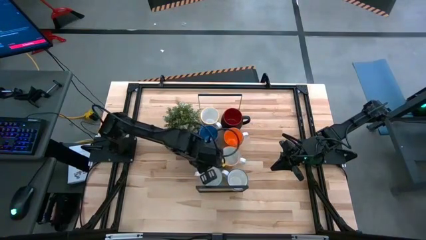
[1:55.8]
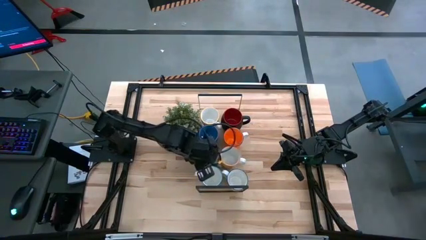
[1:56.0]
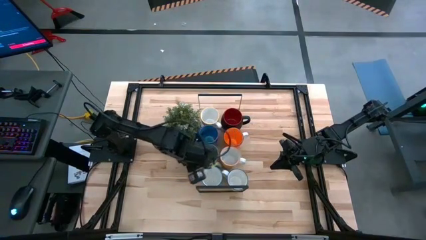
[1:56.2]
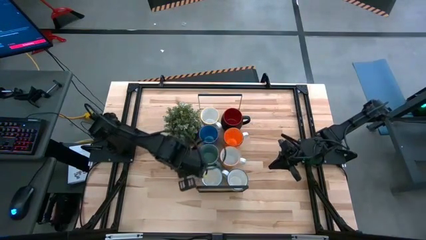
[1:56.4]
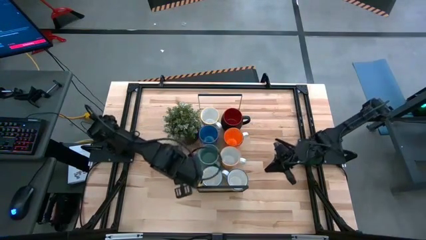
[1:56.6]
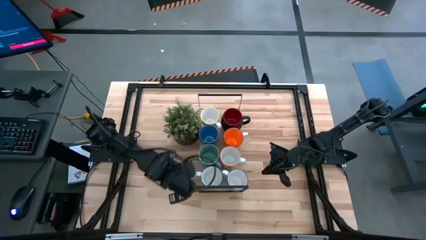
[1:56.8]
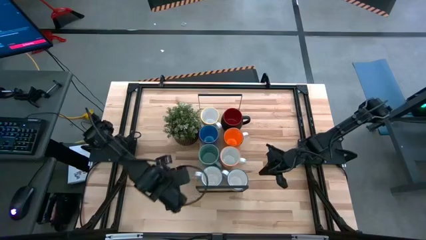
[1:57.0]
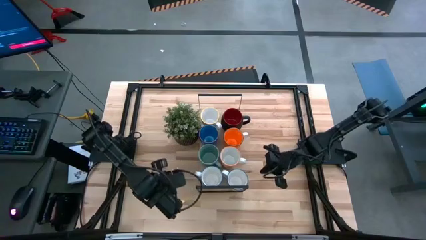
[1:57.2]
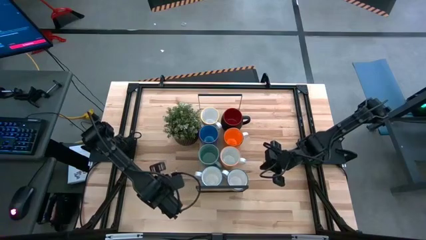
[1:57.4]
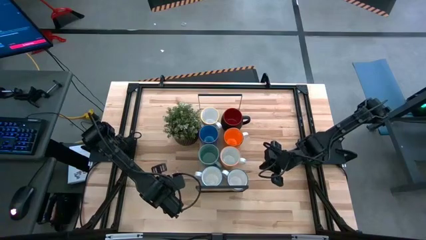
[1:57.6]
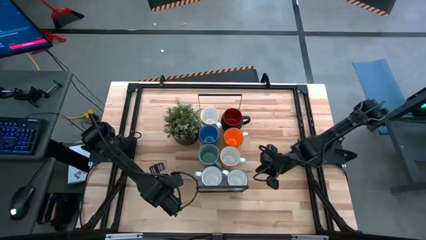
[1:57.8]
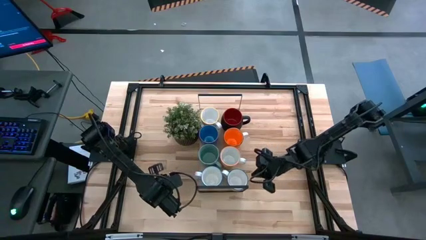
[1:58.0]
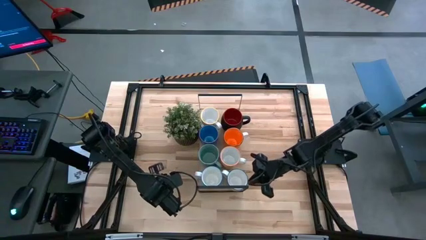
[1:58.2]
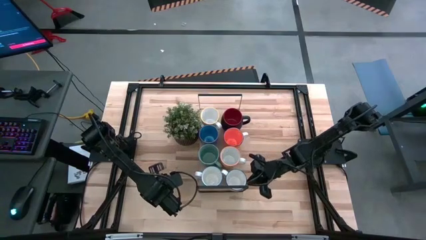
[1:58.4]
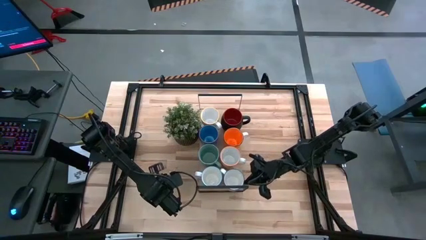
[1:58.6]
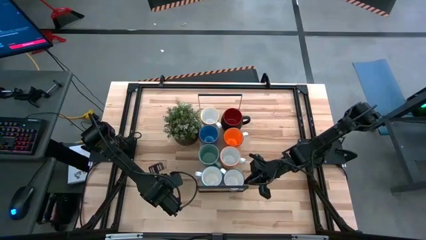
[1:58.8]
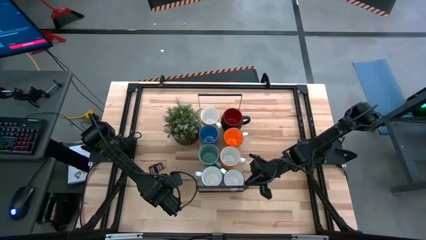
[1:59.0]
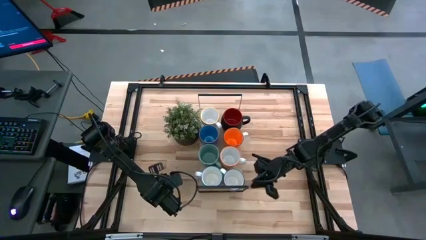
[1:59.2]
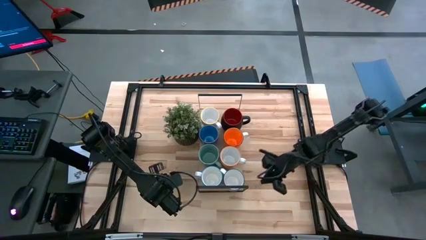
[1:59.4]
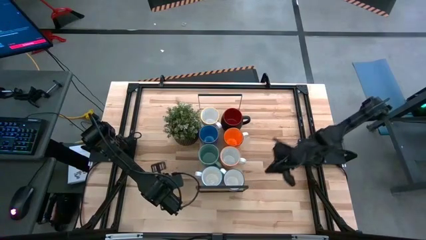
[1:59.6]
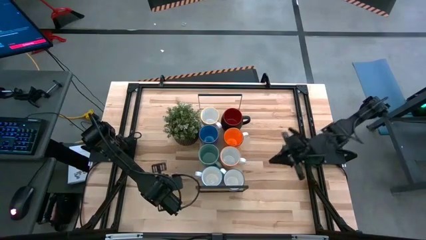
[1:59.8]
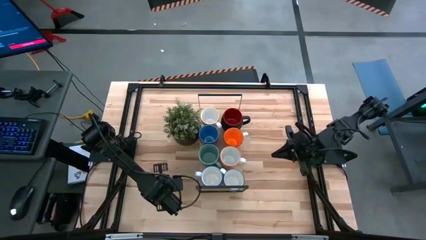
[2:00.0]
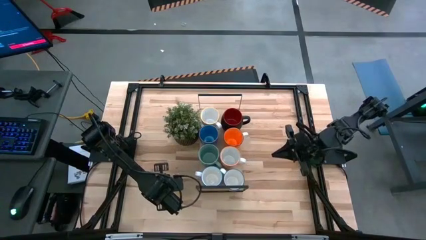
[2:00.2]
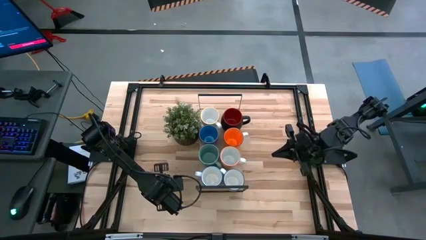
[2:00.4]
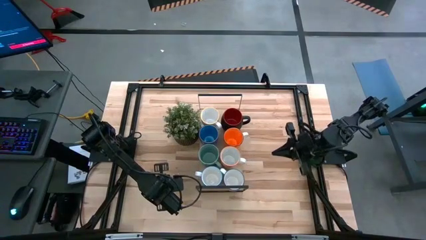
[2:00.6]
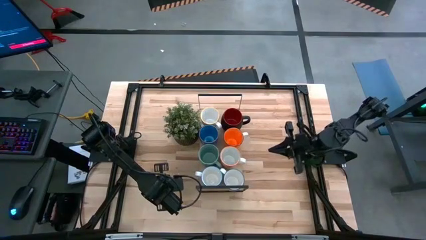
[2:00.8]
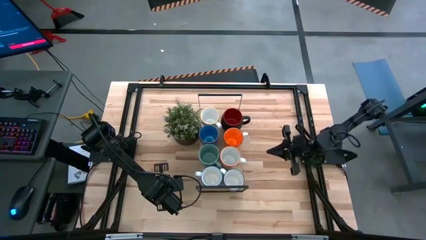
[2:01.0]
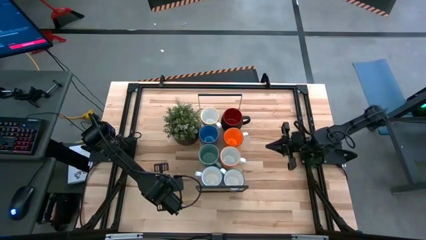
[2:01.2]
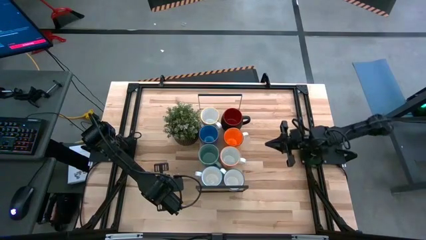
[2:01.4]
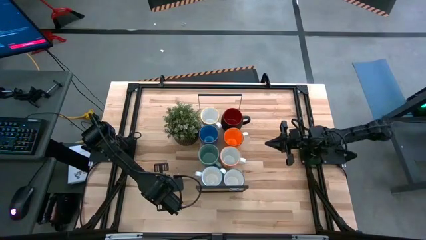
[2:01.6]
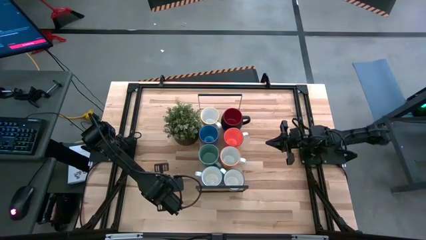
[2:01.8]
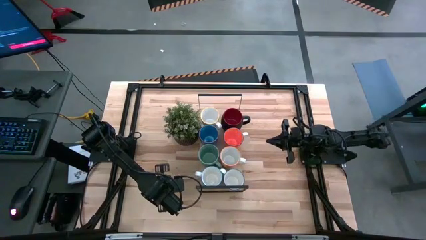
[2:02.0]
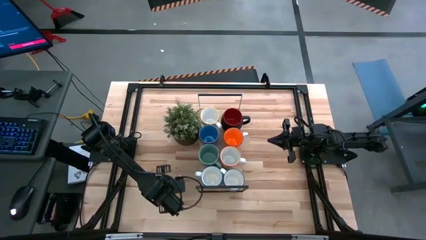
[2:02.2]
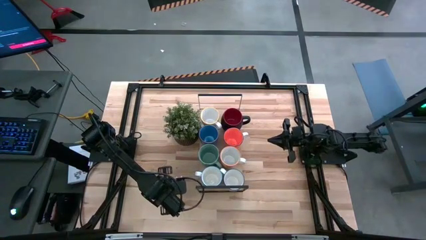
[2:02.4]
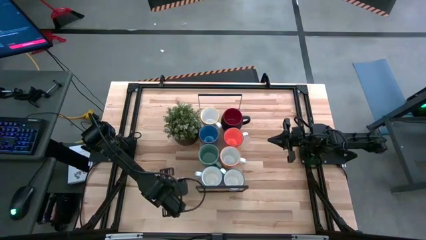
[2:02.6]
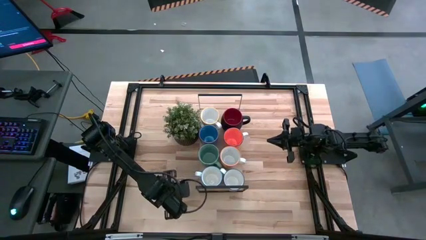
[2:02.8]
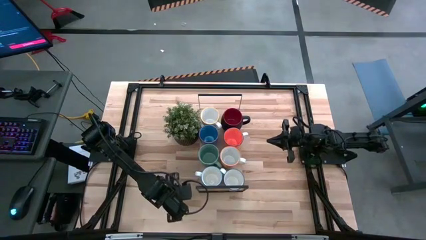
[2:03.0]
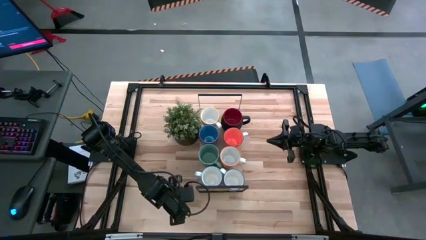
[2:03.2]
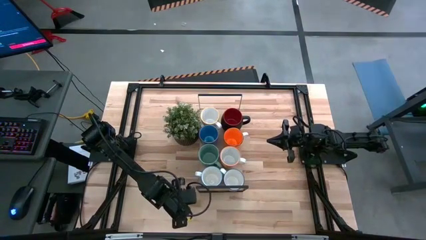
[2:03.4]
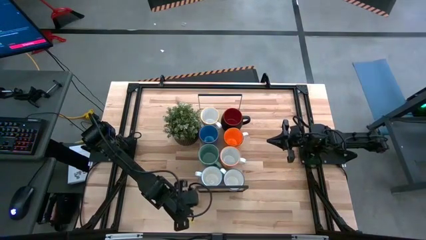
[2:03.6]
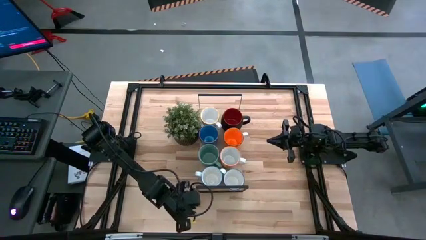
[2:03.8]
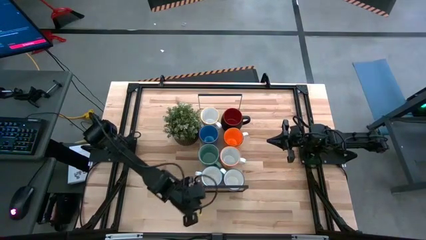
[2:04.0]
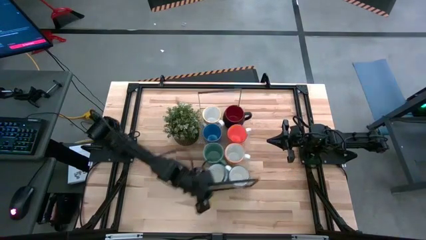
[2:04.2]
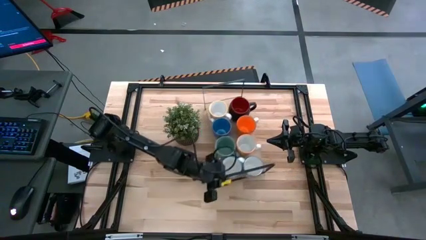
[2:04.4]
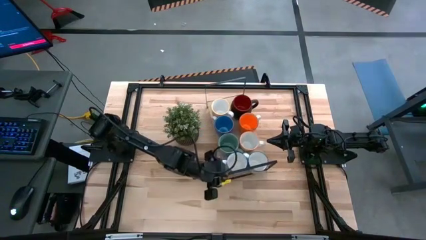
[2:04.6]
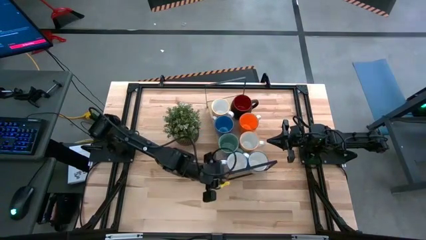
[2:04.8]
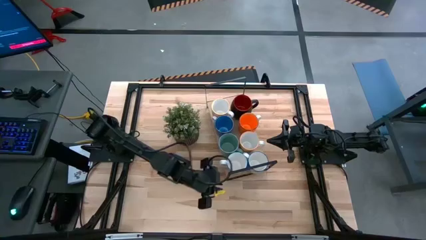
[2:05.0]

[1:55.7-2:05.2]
Task: Place coffee mugs
Adjust the patterned blue mug on the shelf

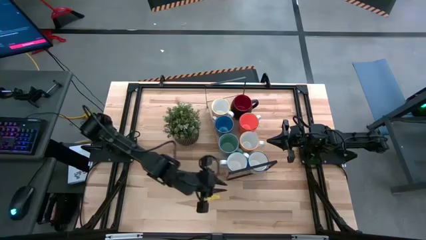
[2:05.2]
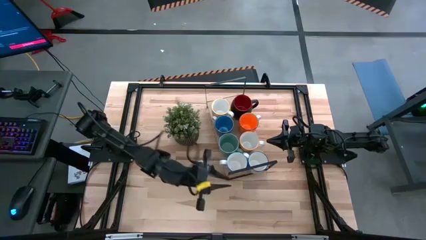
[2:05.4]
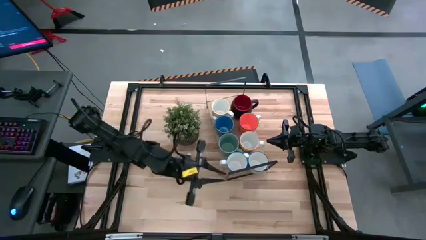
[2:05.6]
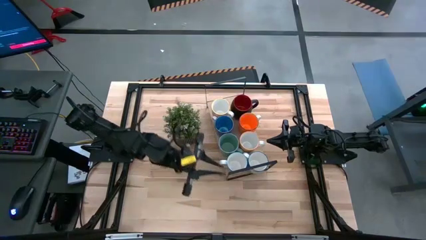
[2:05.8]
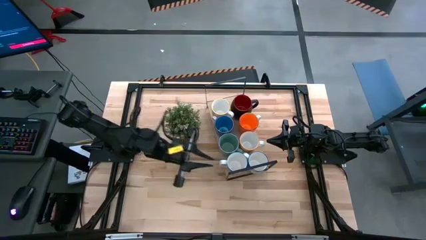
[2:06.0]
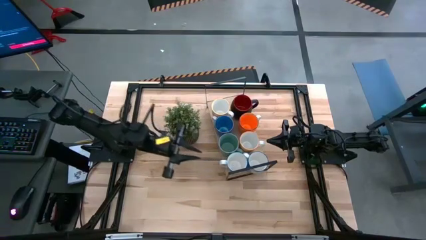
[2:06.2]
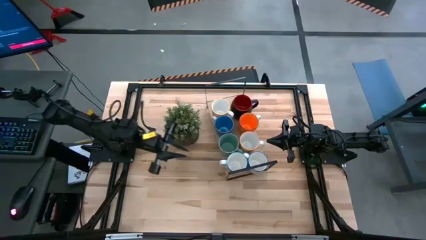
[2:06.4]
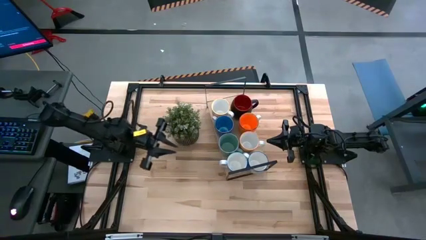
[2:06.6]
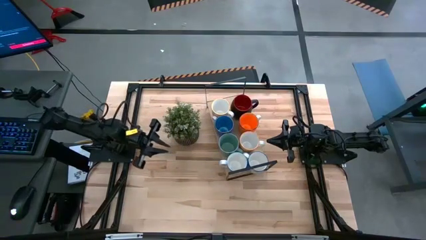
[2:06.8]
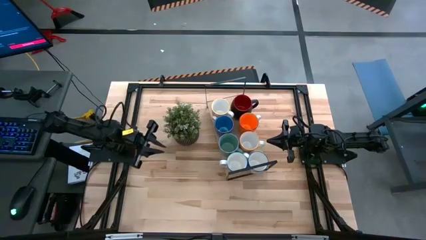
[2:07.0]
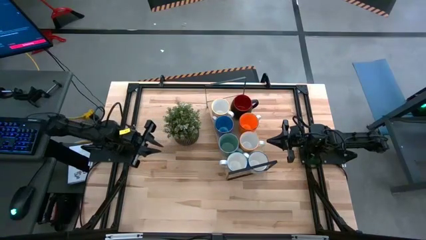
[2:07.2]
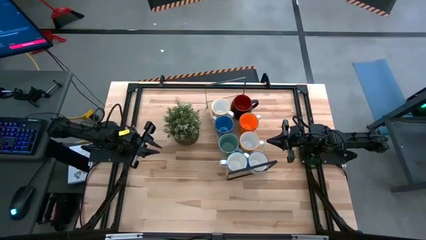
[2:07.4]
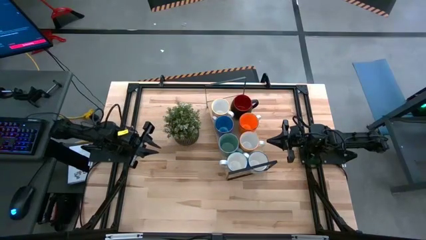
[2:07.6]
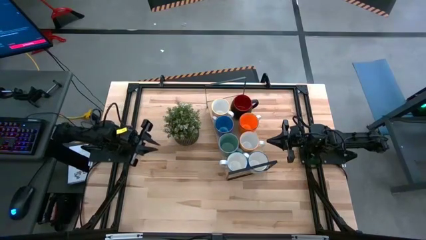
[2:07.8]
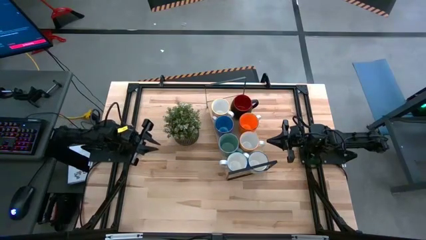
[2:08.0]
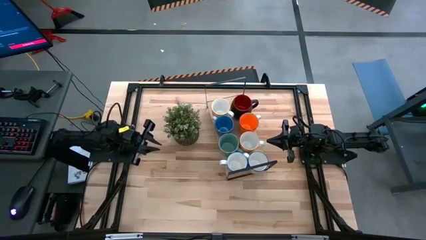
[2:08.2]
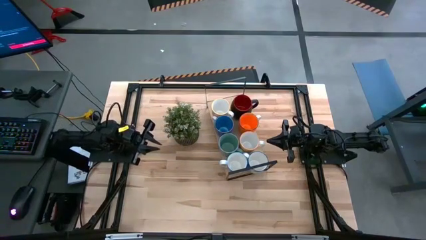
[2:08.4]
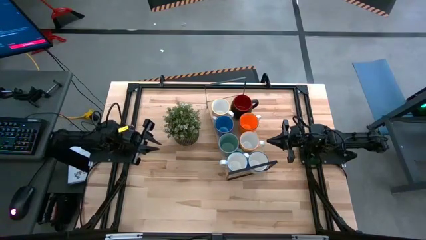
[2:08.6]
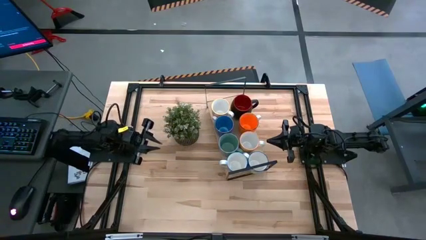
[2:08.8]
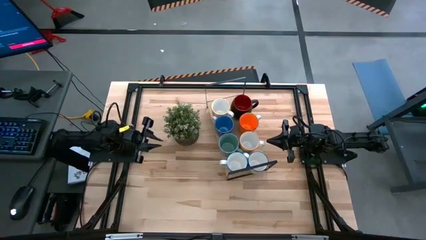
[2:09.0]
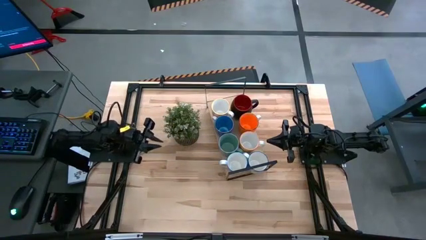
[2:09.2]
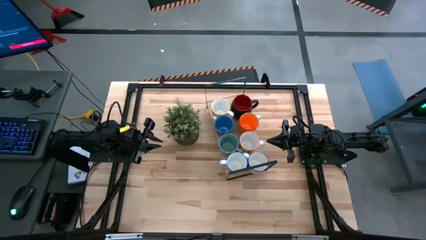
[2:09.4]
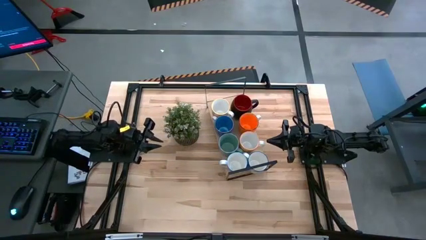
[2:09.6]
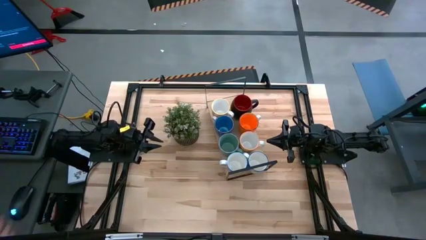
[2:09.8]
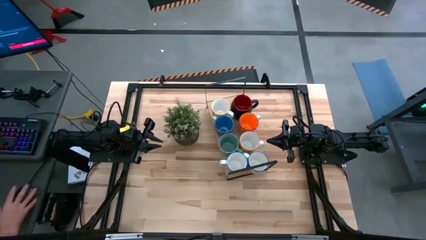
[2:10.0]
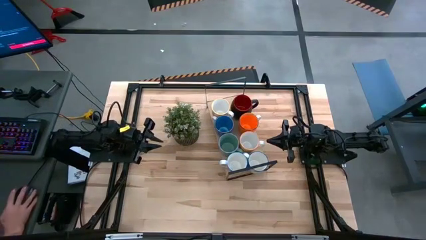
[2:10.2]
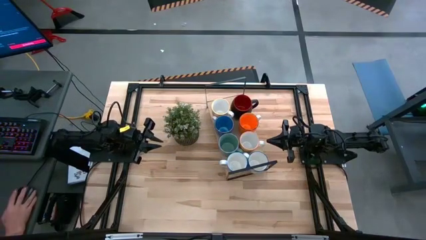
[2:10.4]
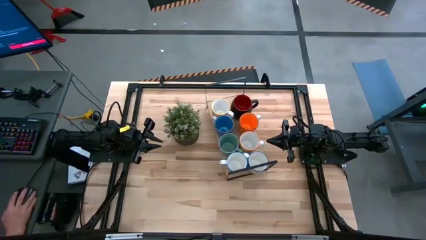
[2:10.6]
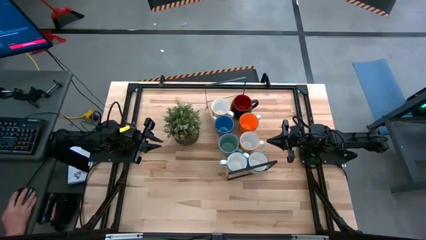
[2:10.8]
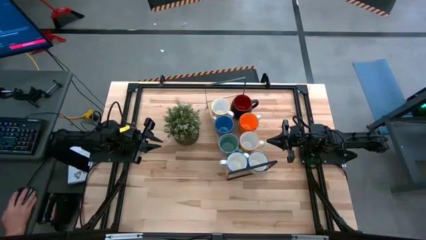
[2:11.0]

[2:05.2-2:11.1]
Return to Home Position
